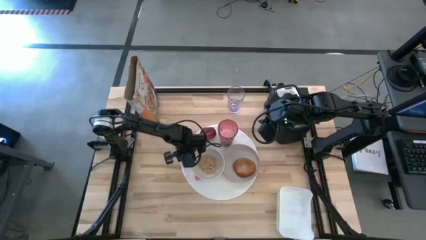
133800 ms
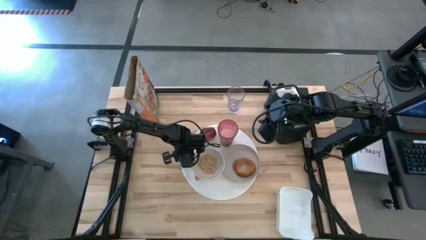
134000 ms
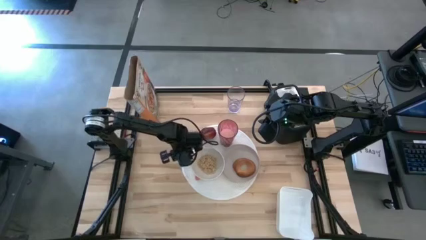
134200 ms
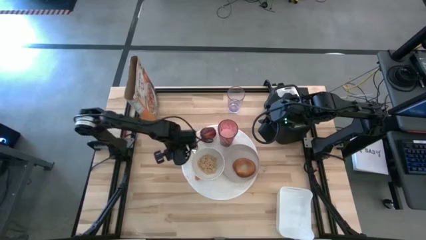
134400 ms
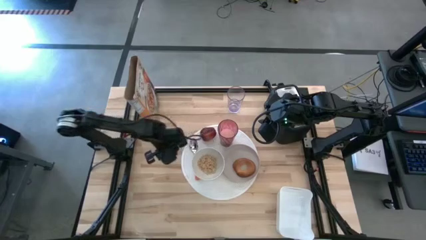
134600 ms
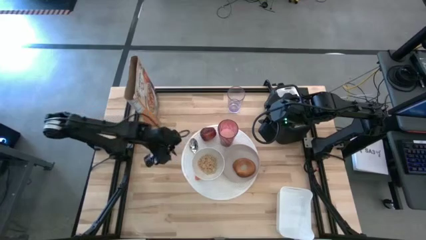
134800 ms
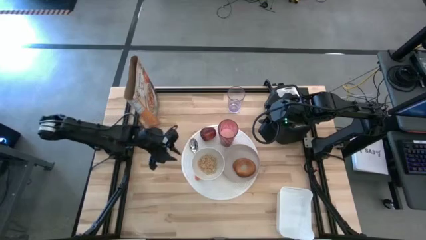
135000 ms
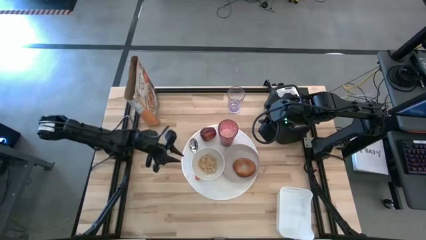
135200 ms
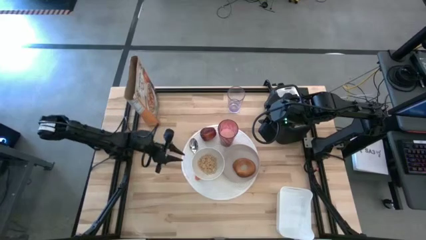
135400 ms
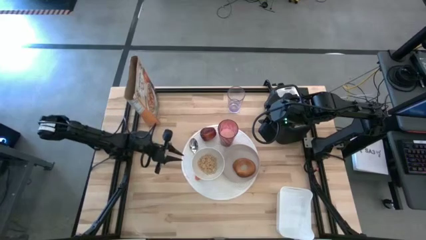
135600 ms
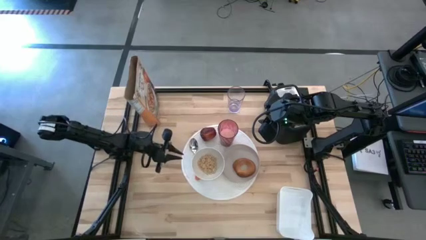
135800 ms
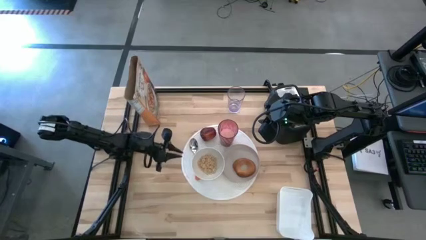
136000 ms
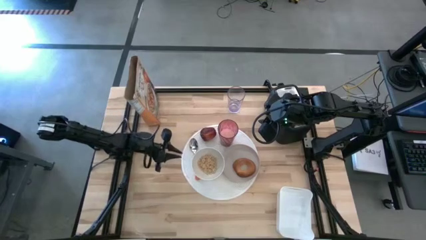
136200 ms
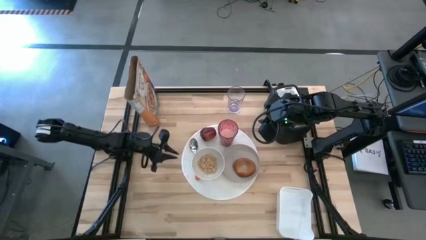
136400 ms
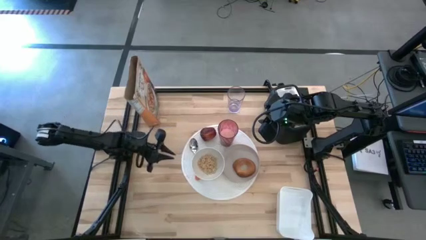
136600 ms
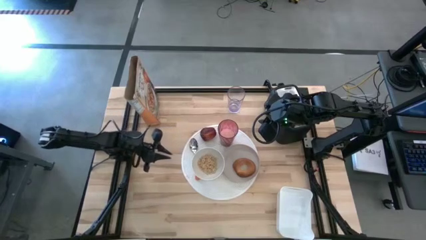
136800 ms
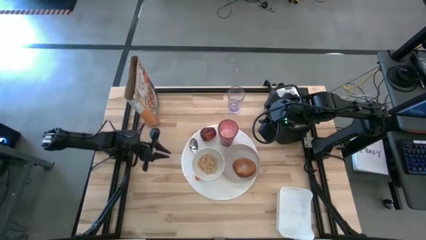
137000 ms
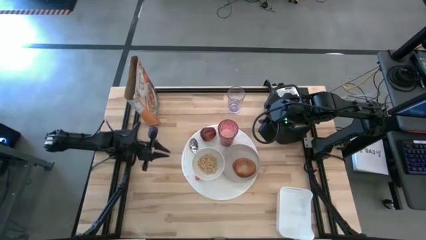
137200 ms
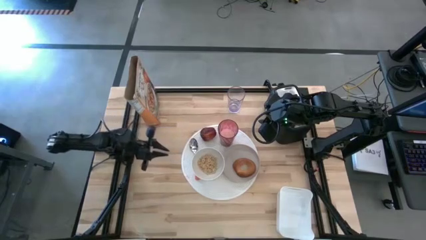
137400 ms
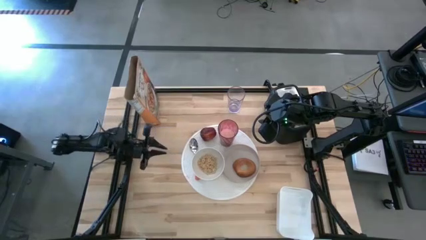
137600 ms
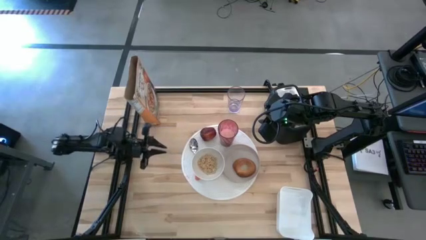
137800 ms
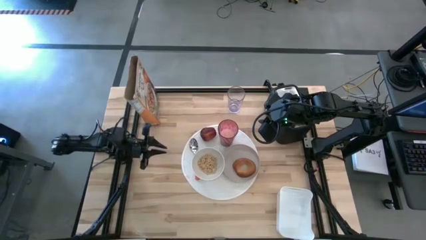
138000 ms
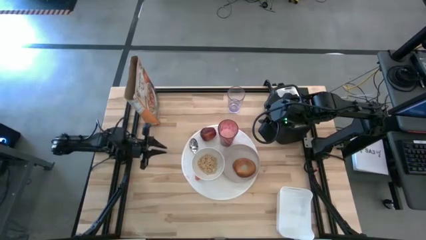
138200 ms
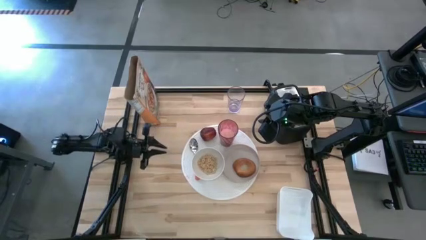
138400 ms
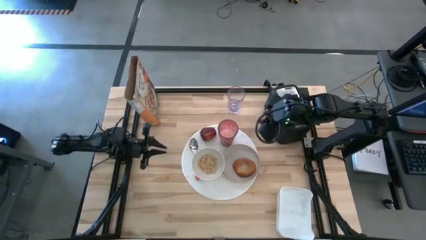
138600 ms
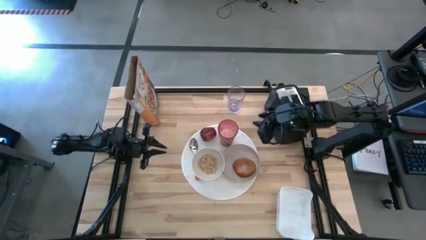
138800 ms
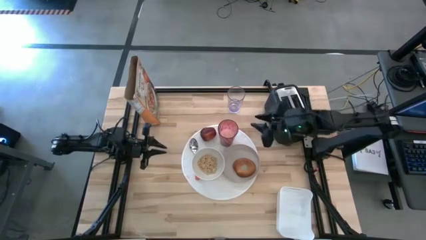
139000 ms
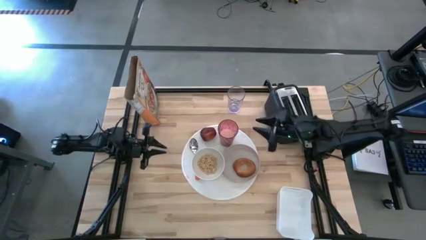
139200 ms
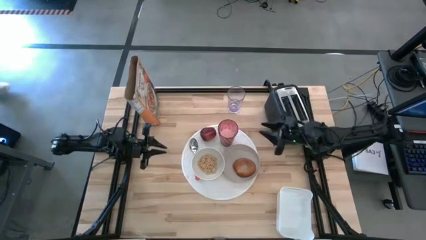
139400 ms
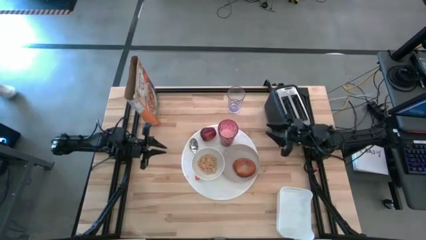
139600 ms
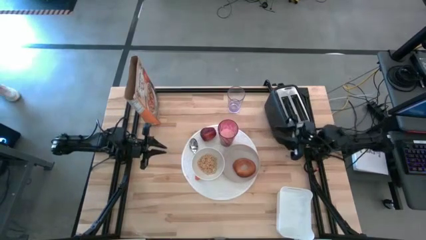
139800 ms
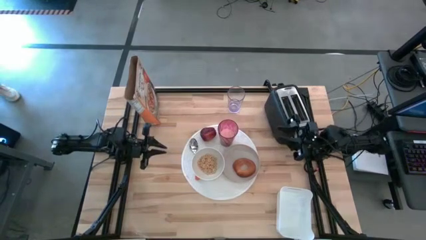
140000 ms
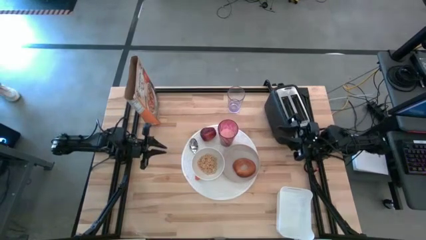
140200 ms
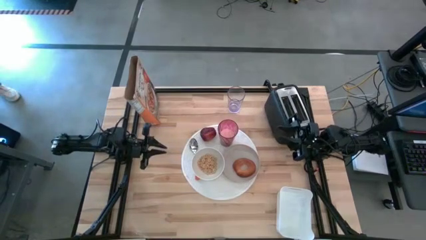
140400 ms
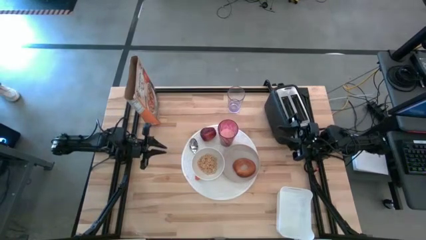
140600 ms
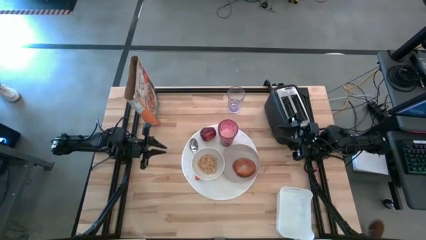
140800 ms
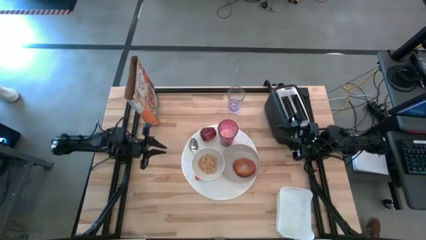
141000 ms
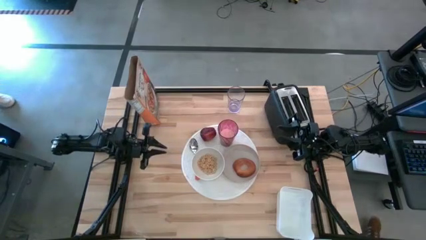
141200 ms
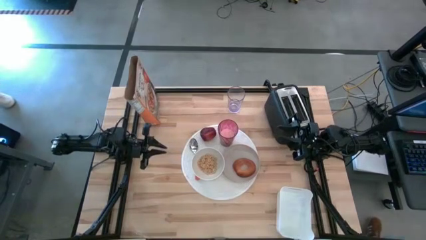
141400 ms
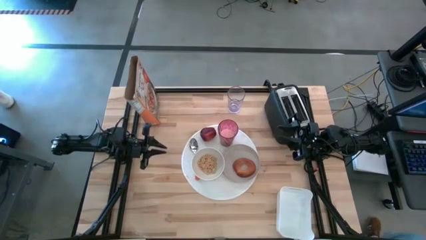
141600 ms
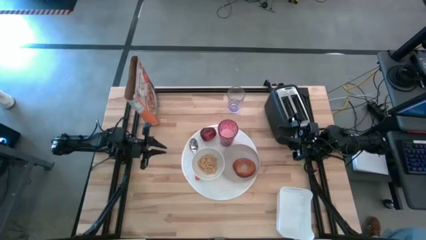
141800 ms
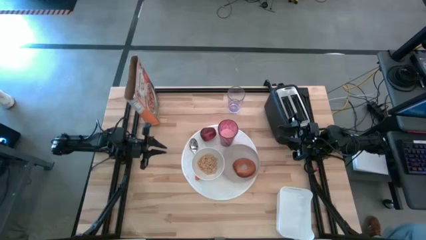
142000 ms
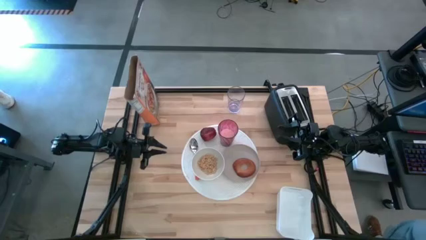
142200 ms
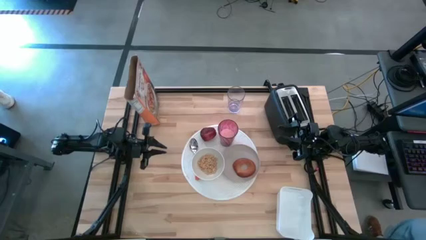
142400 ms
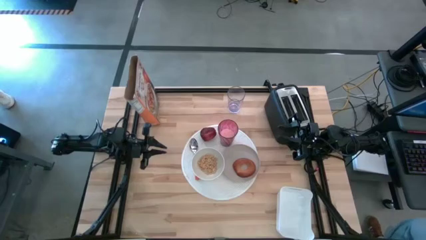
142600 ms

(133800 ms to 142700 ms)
Task: Arrange a breakfast setting
Return to Home Position

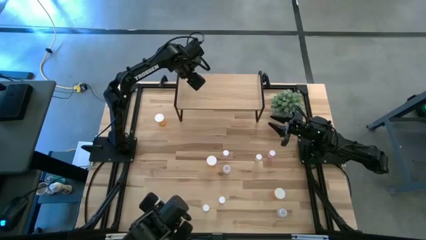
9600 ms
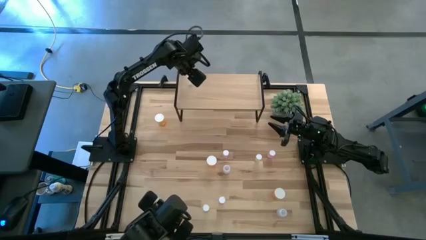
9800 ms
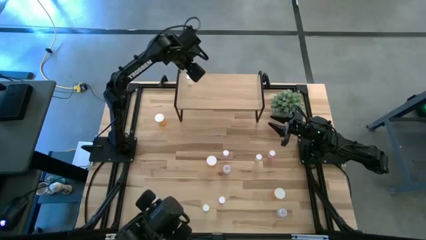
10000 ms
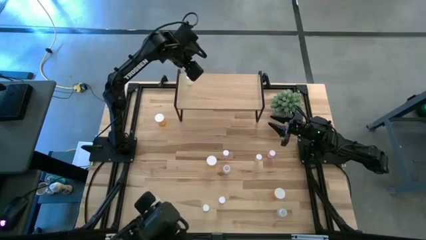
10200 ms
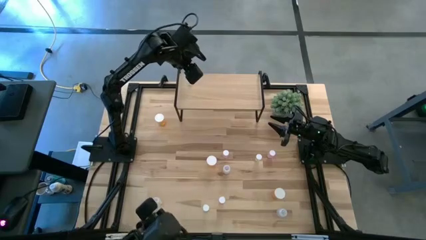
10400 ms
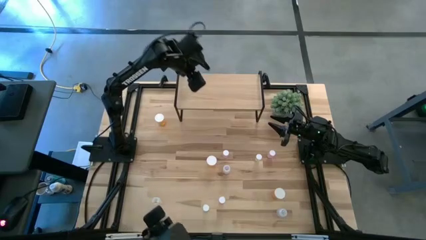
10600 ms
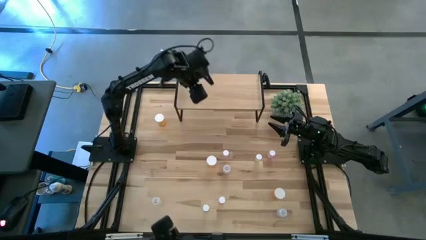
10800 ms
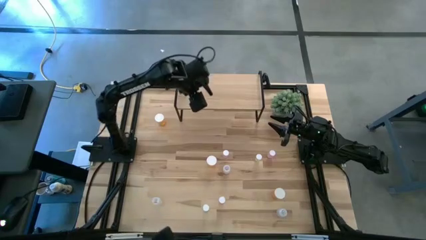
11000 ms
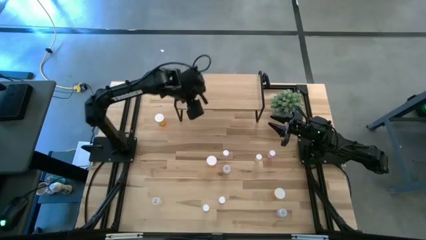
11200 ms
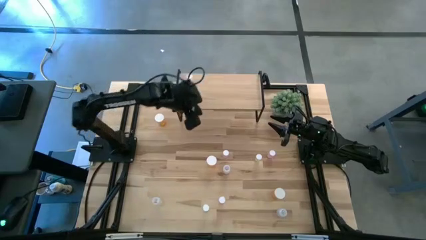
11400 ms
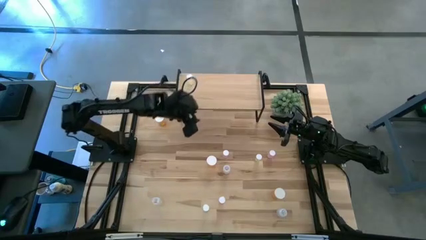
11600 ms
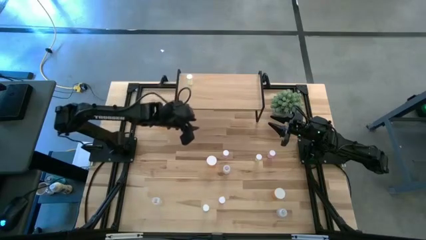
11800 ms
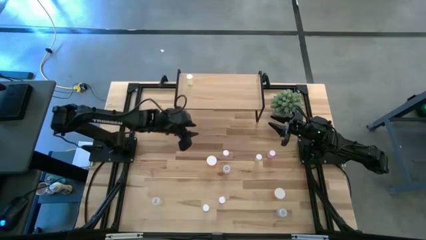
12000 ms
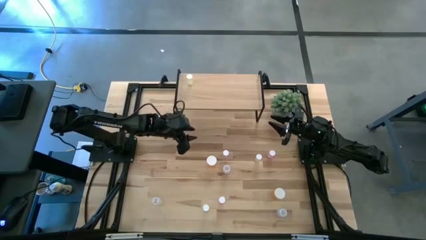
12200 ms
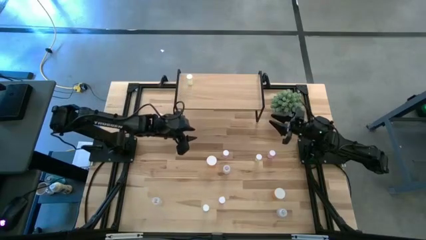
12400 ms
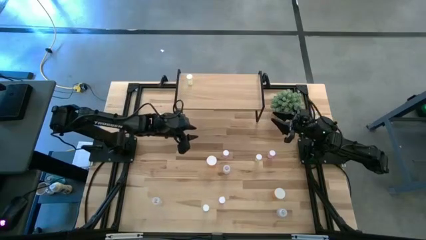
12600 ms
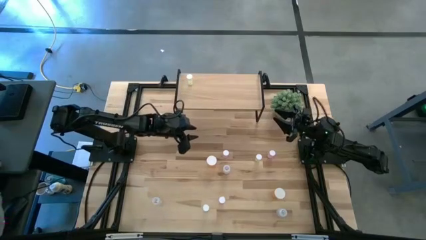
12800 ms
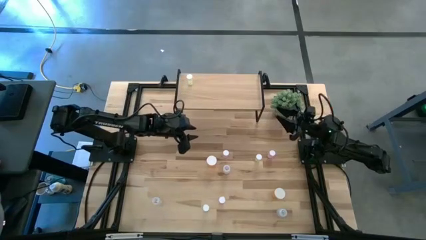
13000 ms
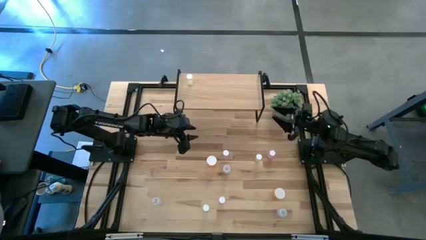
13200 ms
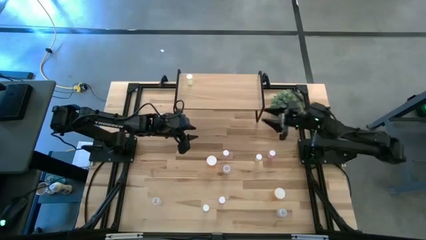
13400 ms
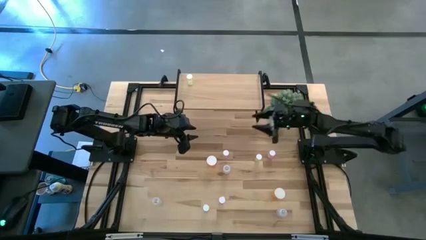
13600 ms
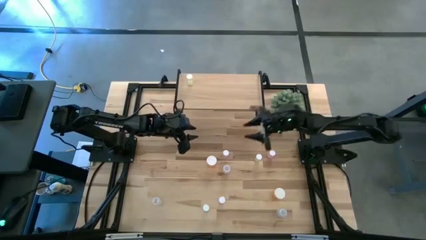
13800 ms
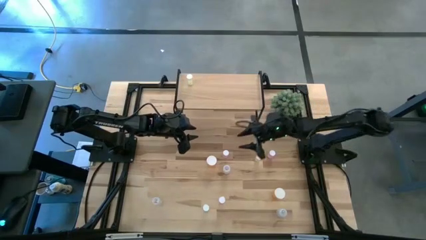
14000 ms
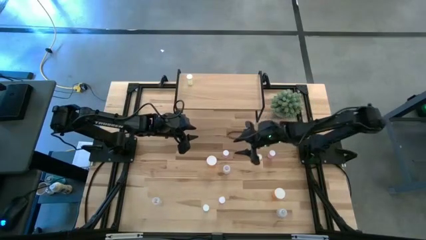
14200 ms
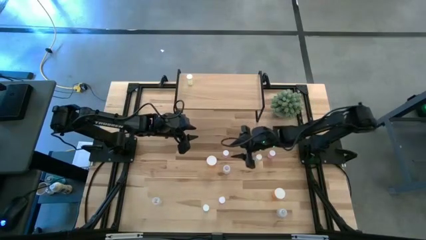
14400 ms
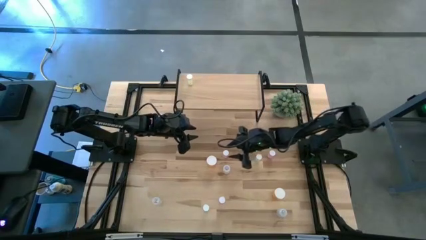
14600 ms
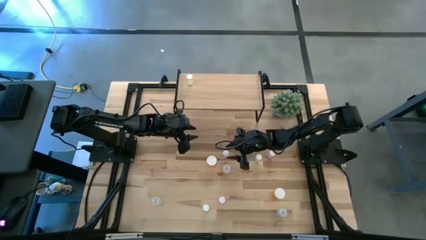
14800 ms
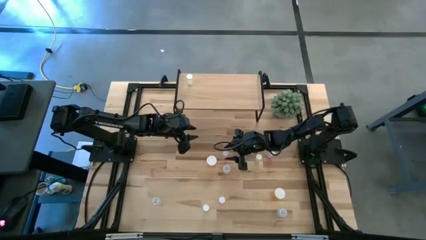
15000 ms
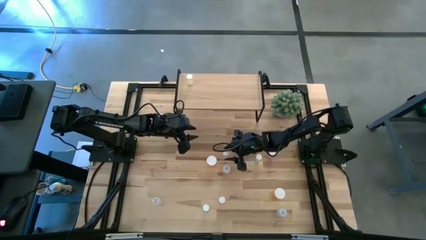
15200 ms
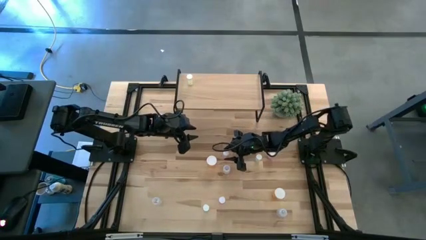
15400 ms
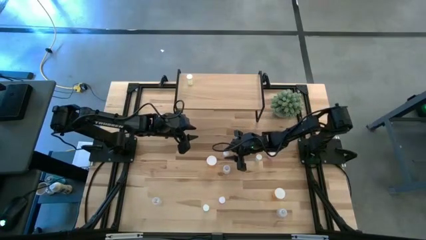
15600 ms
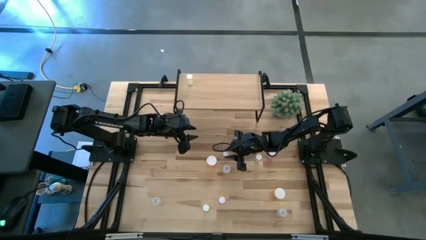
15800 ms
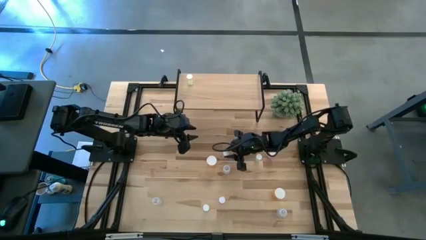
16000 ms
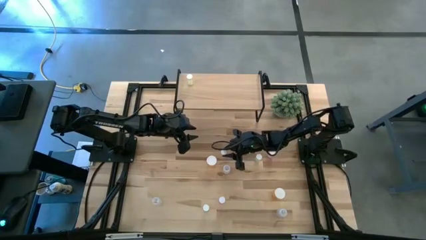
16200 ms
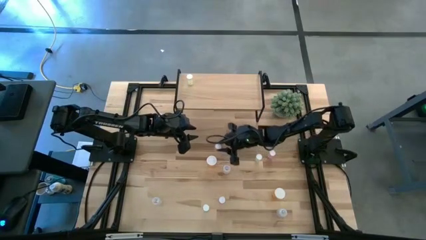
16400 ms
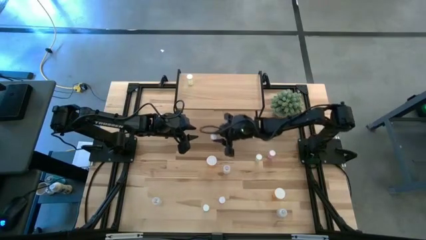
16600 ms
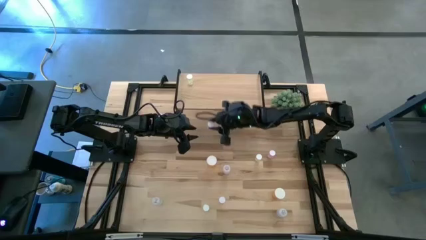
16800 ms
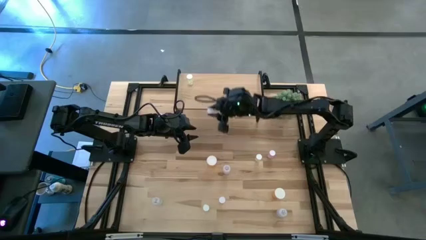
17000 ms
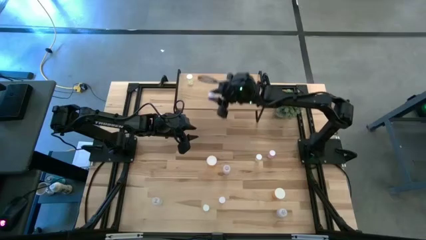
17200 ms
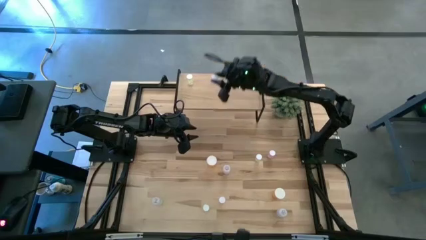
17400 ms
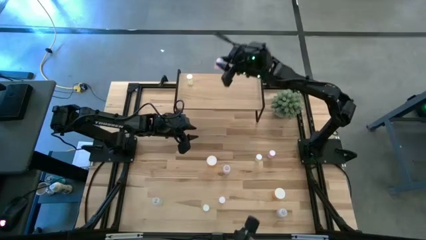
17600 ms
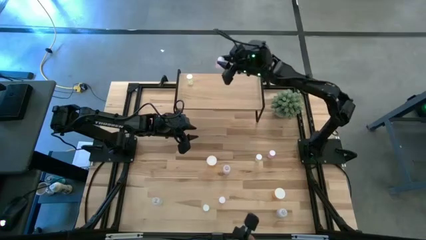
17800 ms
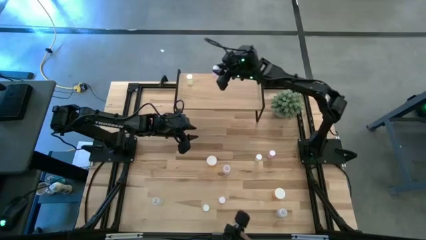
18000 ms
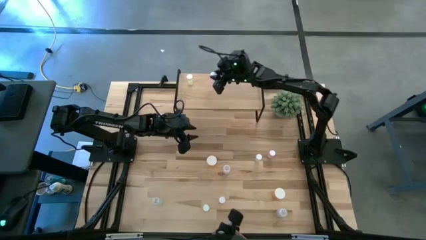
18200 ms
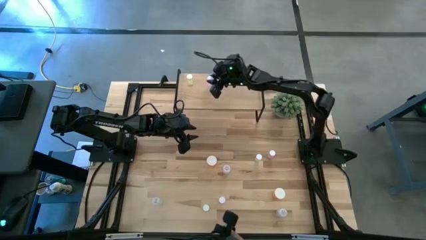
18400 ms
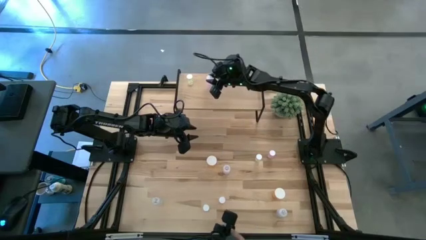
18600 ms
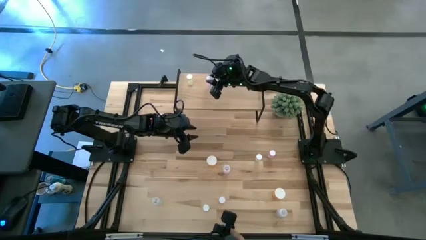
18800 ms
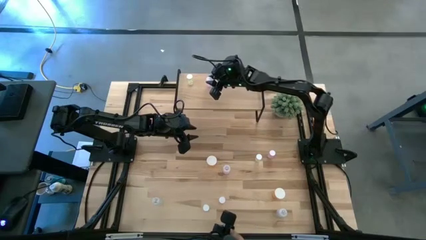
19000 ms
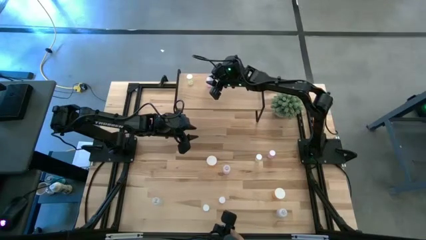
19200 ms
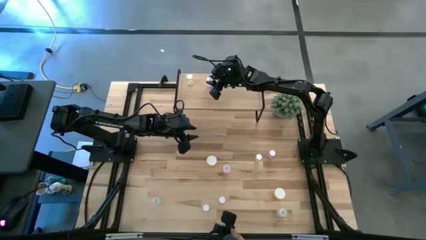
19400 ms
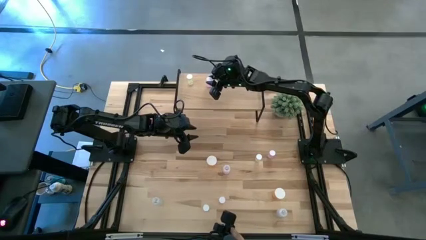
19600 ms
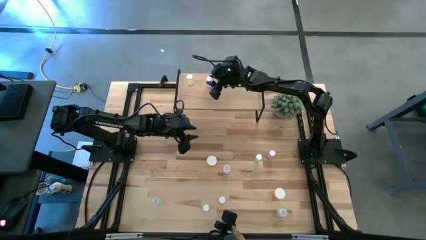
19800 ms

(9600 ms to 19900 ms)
Task: Pick and place medicine bottles onto shelf by color
Put the left pink pill bottle on the shelf
